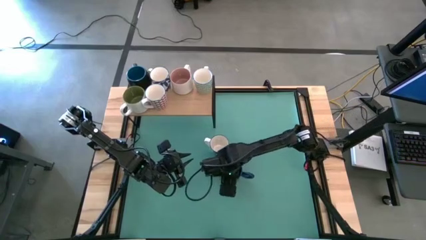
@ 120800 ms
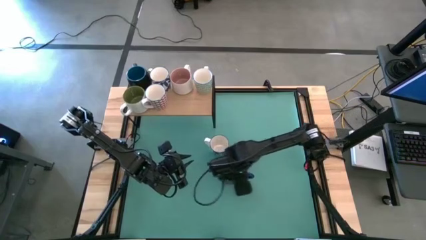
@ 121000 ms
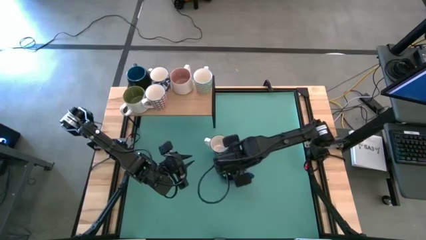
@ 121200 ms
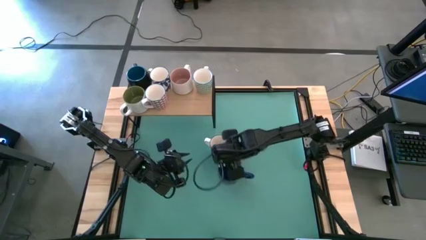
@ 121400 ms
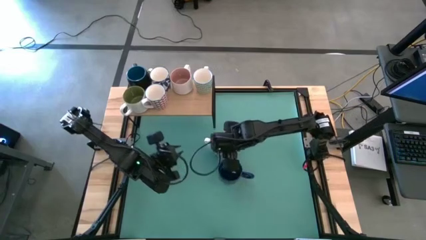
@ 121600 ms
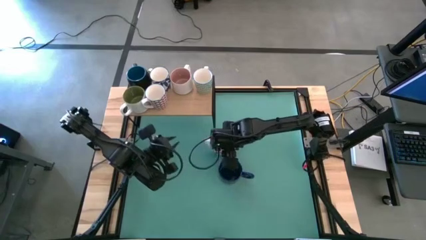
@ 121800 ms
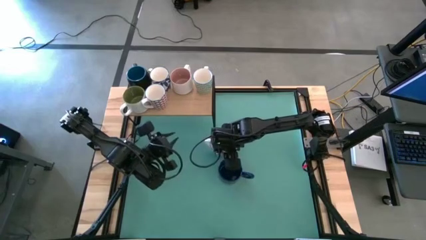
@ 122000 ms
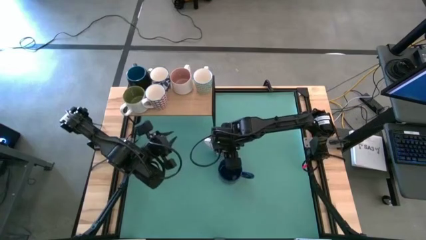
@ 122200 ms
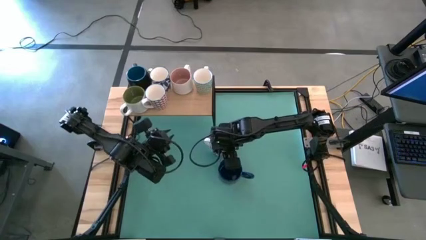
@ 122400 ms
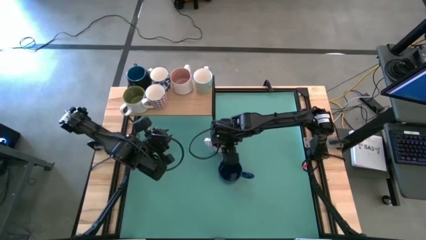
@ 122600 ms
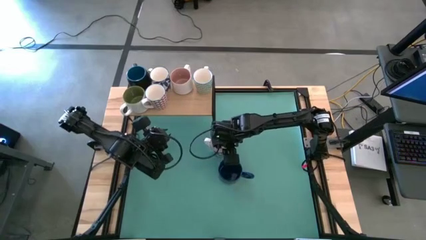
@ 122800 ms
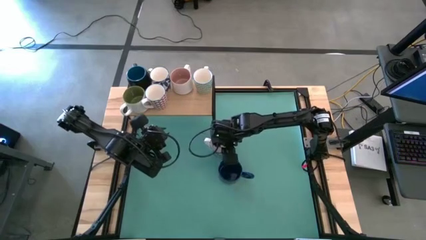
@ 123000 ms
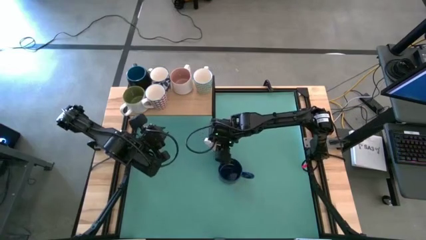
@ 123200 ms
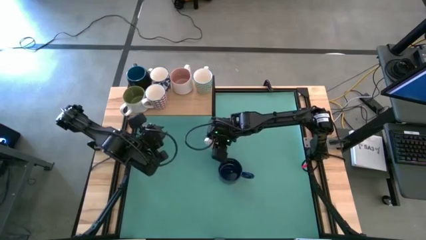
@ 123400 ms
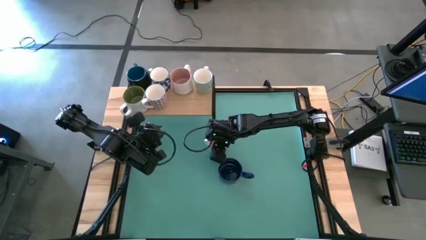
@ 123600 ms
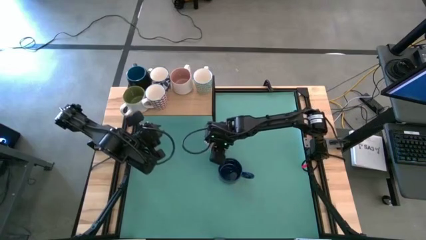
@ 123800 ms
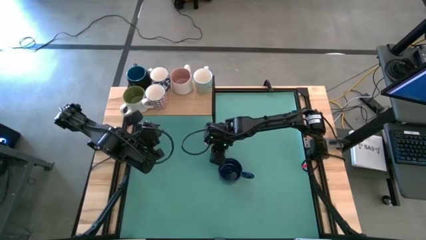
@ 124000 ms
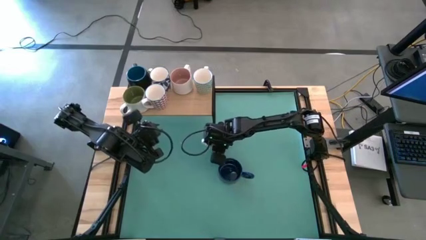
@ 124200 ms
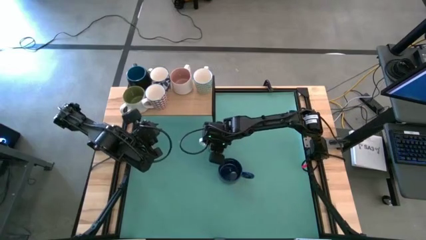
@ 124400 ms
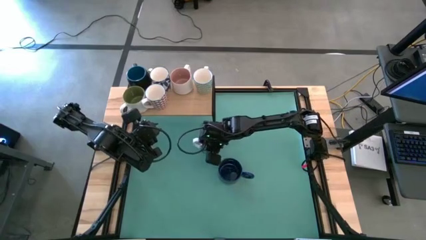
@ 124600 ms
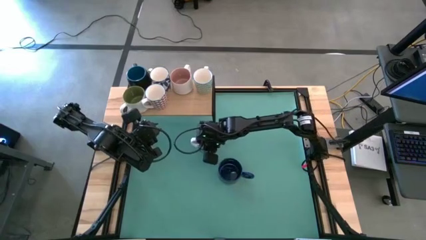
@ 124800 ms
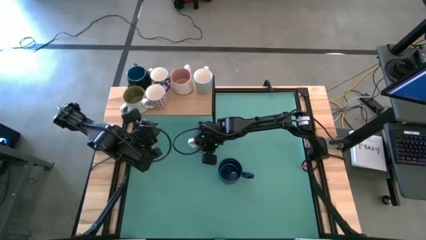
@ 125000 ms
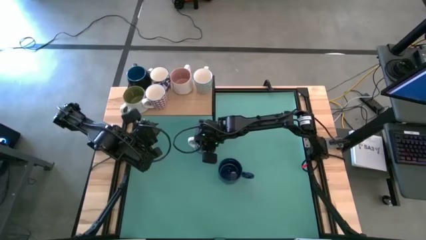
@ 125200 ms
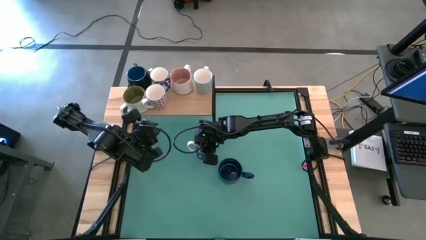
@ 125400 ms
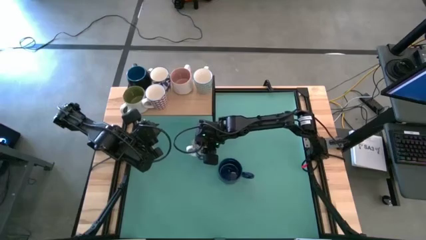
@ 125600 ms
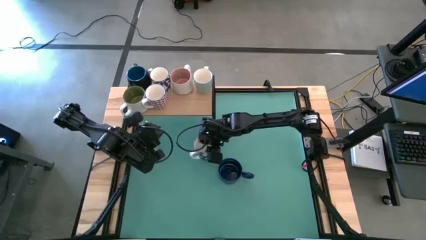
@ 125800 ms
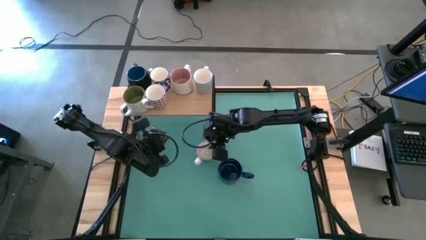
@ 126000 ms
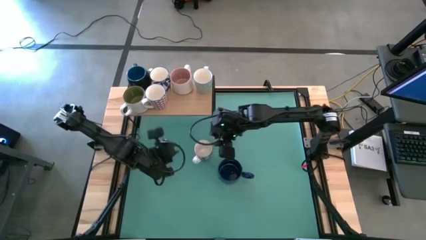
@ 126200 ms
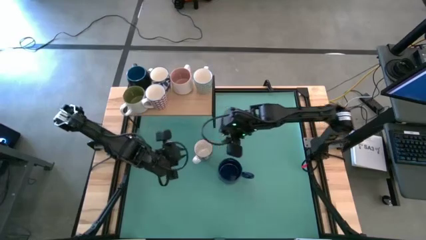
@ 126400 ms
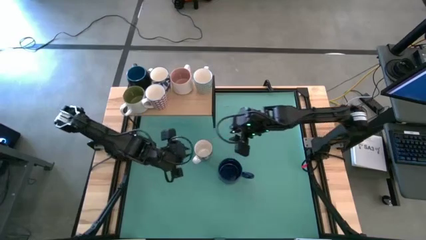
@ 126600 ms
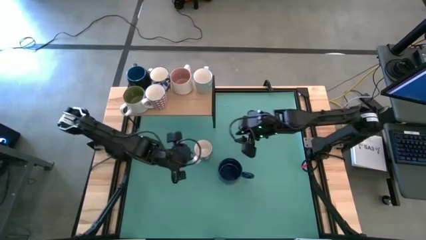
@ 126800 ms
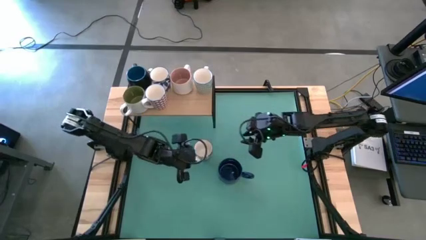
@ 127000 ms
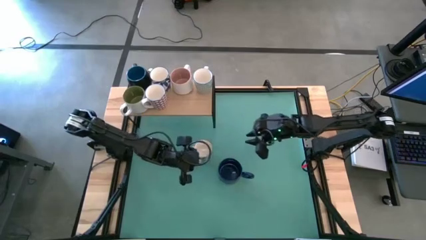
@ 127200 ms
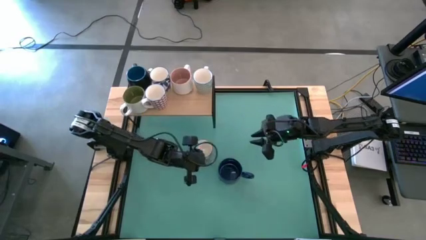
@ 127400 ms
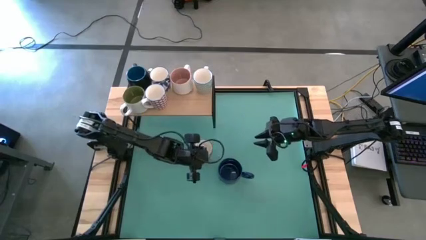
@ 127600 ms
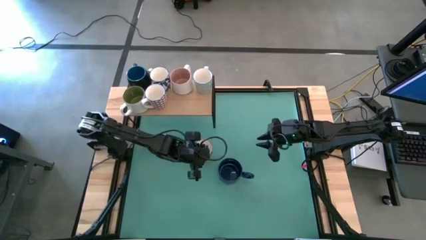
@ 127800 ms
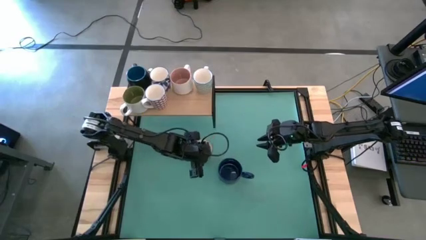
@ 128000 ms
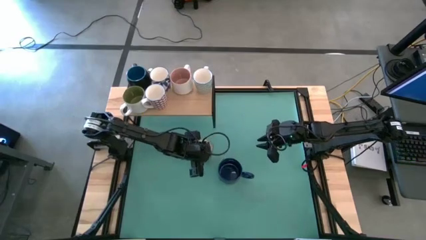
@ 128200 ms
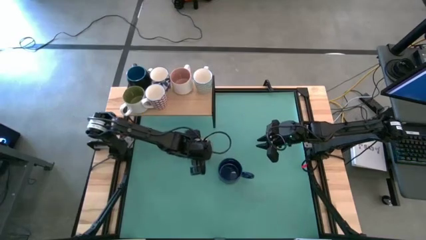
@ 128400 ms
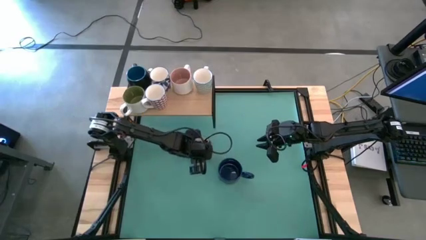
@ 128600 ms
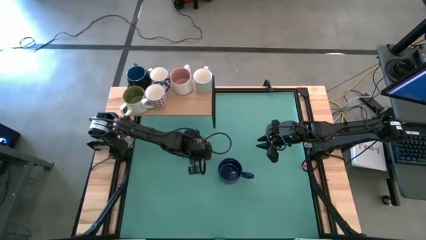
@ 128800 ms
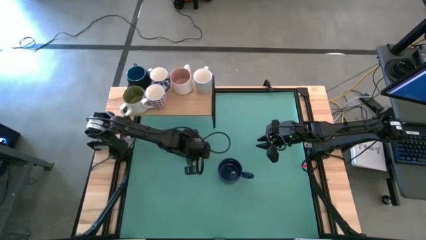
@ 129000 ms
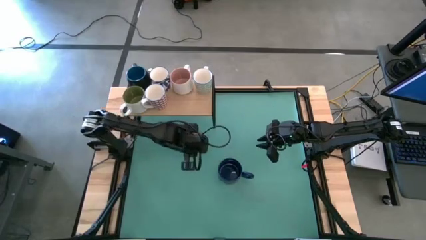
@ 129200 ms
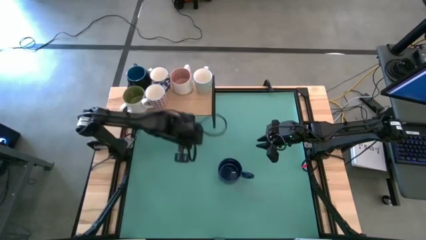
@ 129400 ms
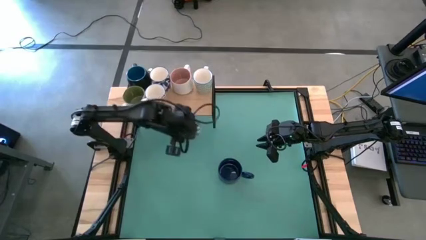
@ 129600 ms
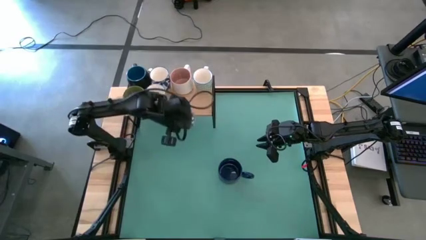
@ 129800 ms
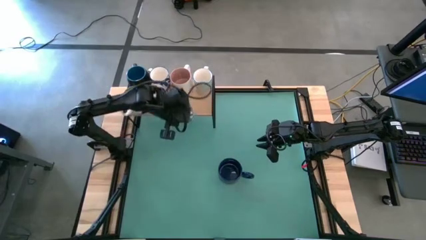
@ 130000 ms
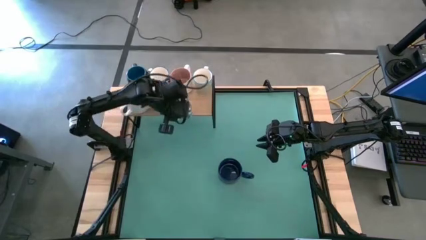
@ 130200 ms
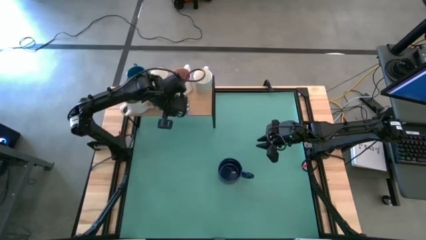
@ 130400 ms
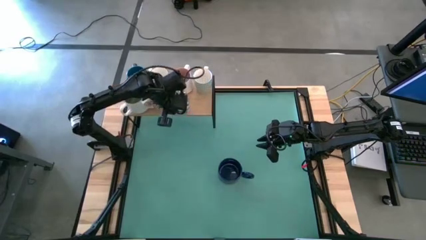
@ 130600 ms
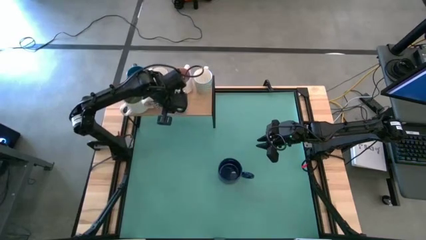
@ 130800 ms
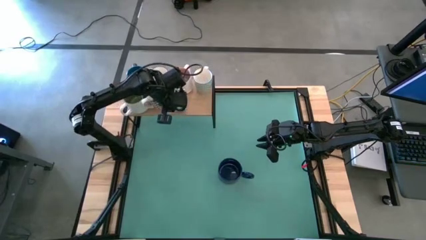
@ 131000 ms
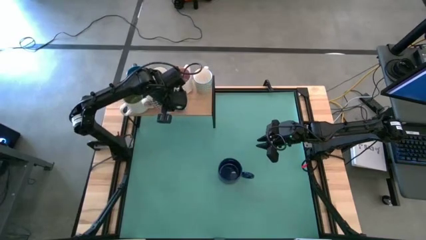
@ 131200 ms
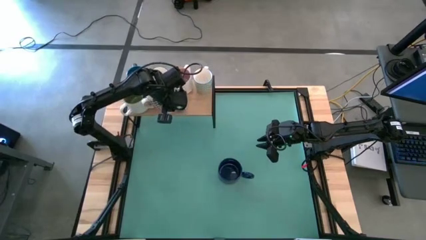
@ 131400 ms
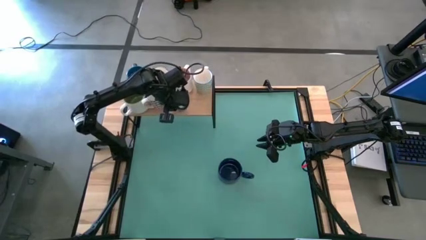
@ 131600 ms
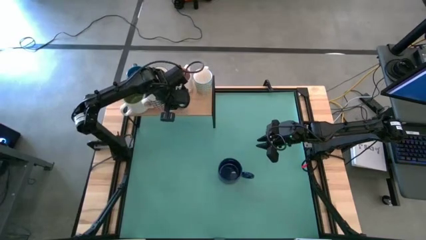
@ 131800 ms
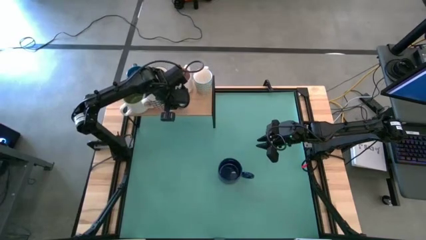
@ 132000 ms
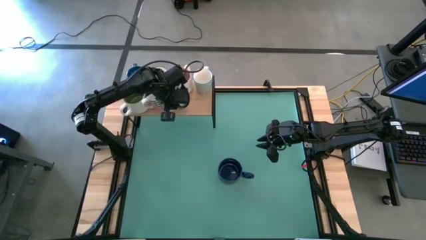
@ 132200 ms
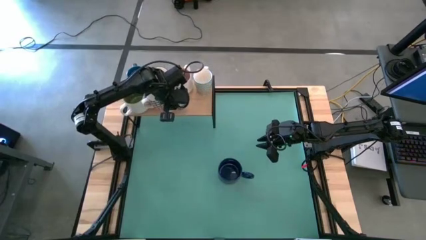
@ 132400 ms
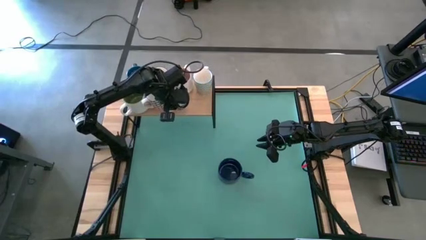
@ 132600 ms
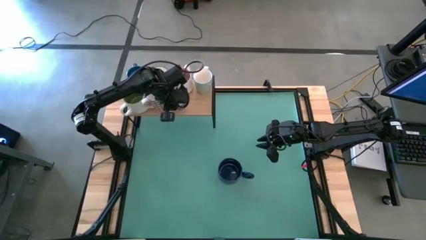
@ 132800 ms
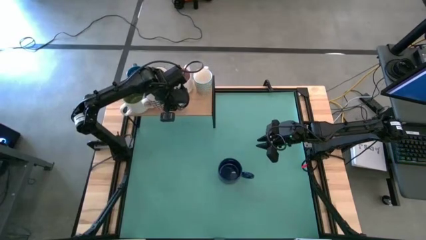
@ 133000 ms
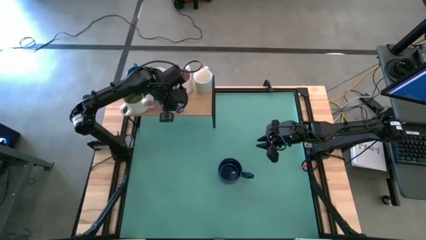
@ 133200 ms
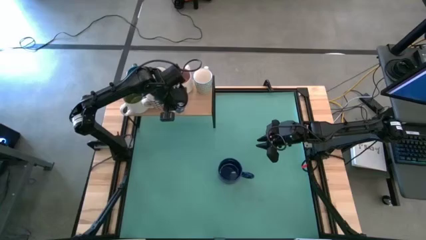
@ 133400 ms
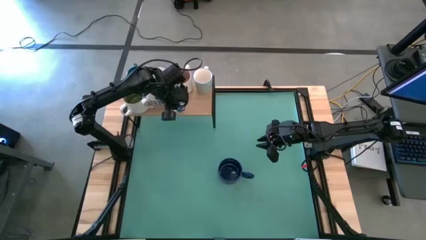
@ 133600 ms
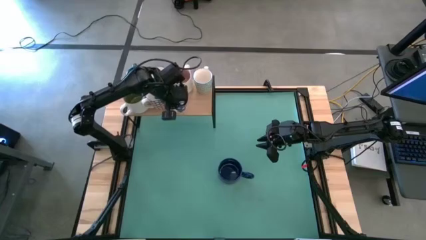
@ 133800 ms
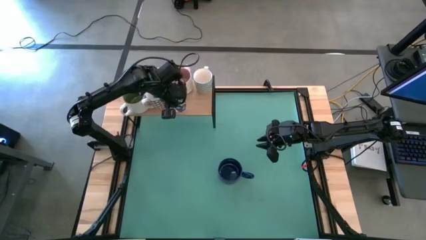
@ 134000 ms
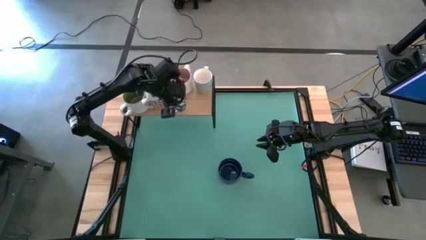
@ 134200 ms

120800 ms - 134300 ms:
Task: Place coffee mugs
Put the white blue patterned mug on the shelf

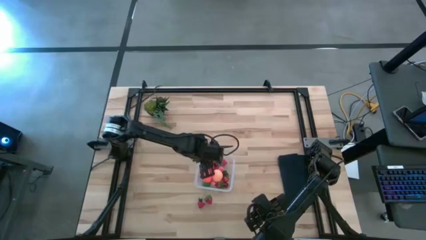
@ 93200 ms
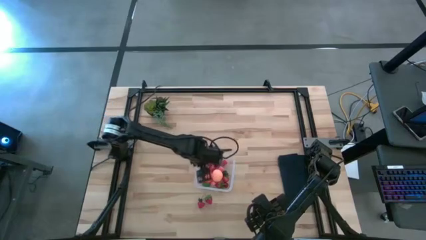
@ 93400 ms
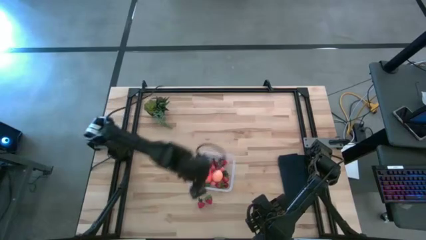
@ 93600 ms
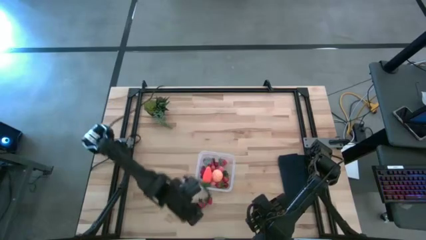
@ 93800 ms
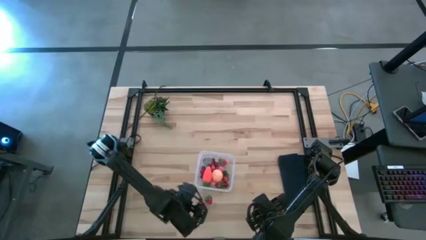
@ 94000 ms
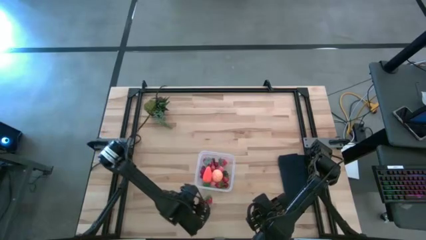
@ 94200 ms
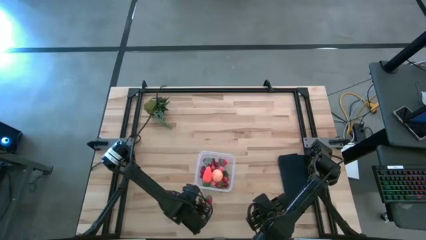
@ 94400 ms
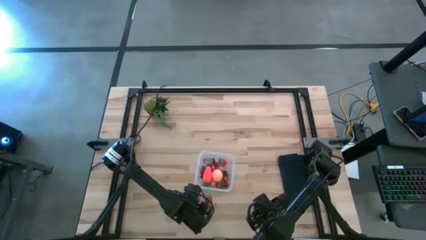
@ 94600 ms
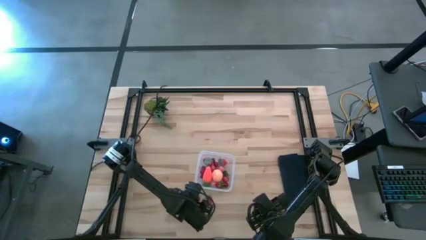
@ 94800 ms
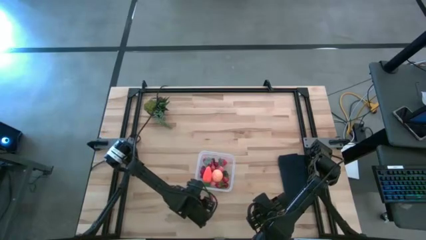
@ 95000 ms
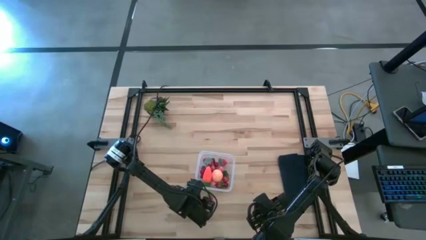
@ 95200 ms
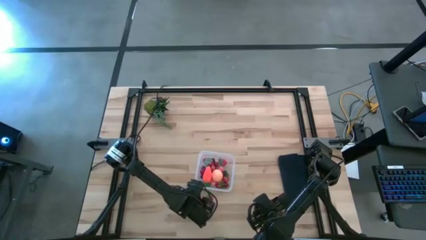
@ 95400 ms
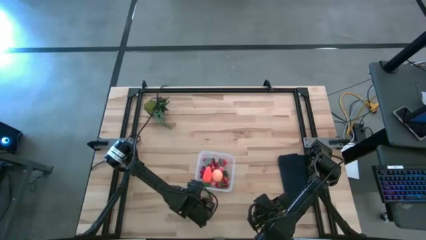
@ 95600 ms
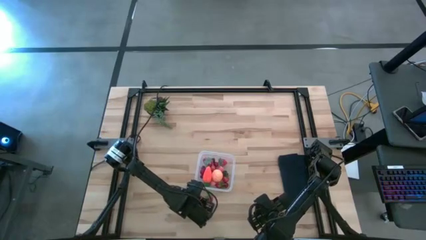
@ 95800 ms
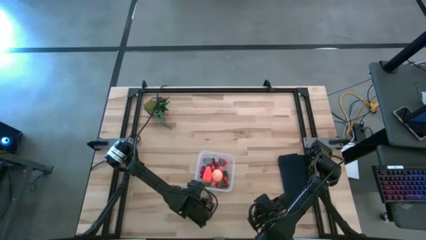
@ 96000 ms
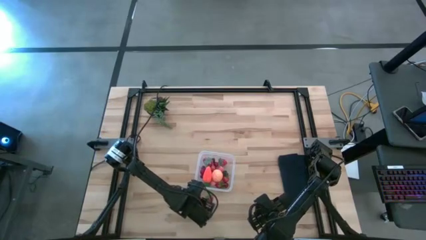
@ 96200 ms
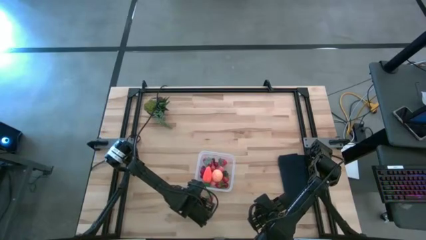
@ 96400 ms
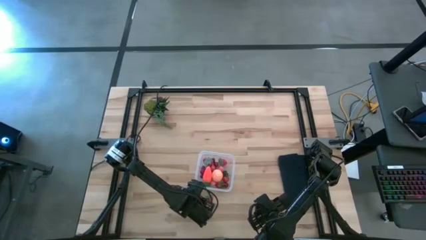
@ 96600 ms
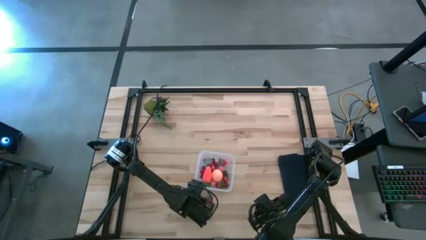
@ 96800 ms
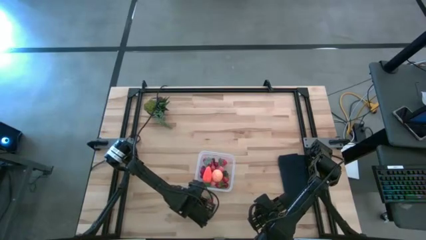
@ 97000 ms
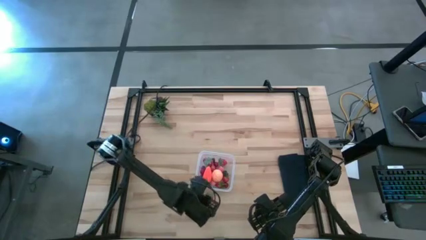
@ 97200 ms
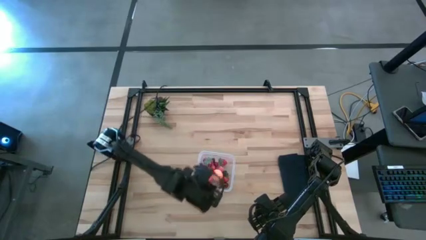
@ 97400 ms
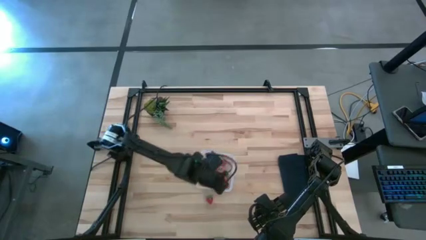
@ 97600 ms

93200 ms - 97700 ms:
Task: Pick and placing Produce into tupperware
Put the strawberry into the transparent container
